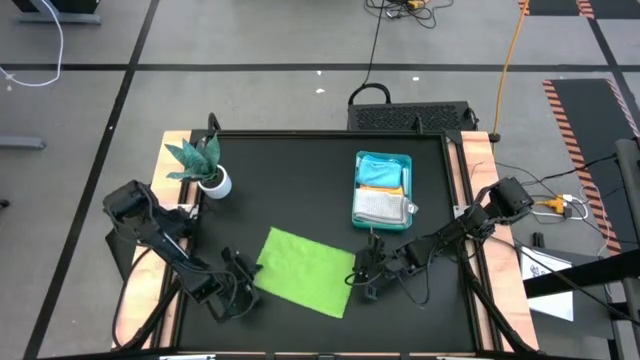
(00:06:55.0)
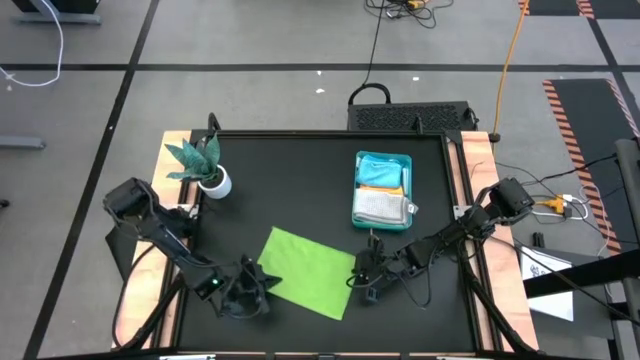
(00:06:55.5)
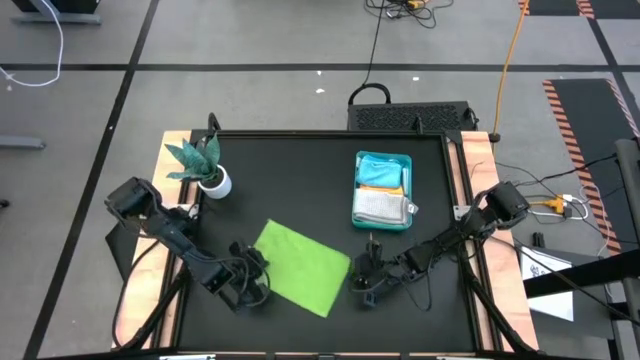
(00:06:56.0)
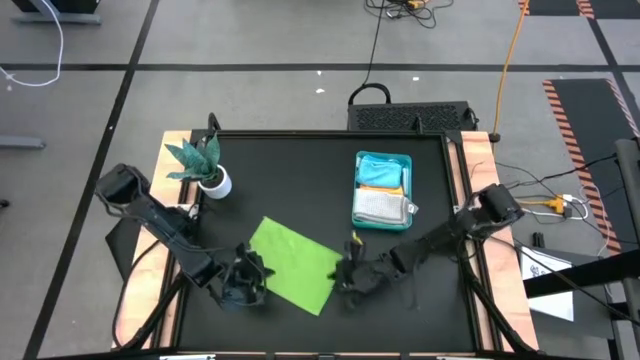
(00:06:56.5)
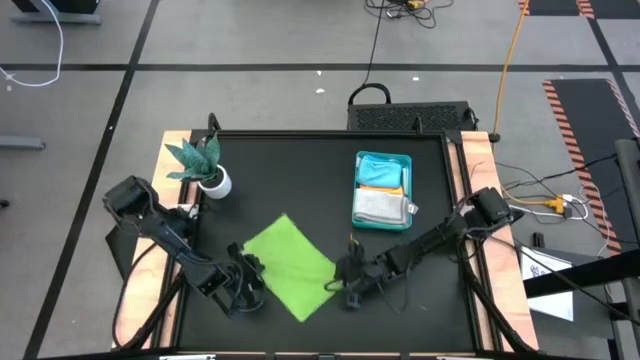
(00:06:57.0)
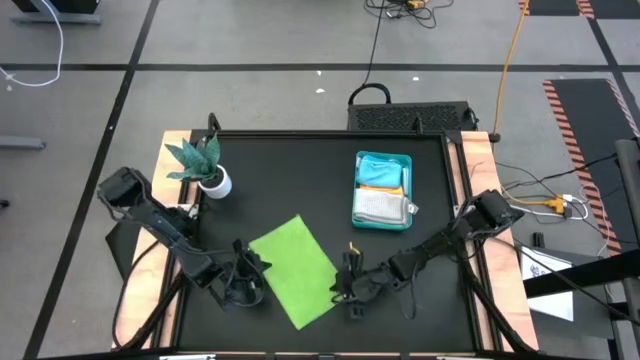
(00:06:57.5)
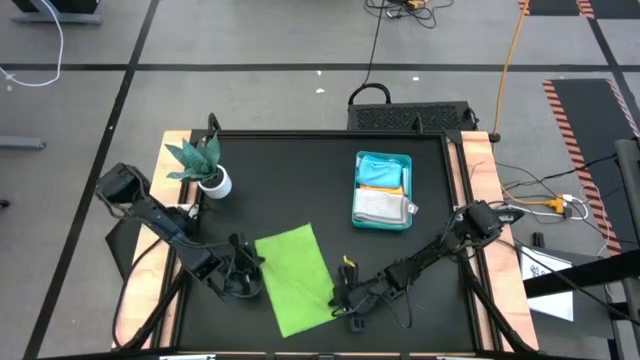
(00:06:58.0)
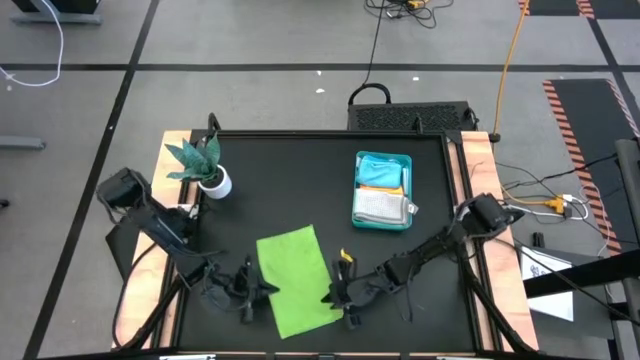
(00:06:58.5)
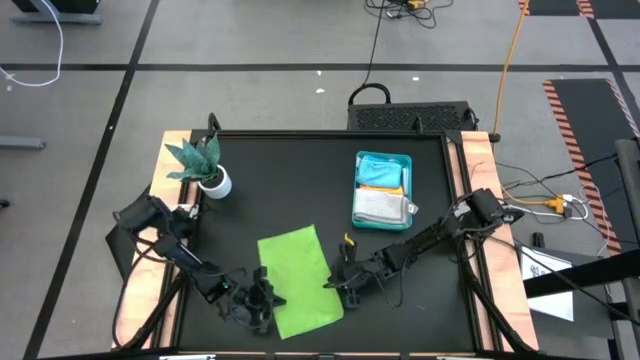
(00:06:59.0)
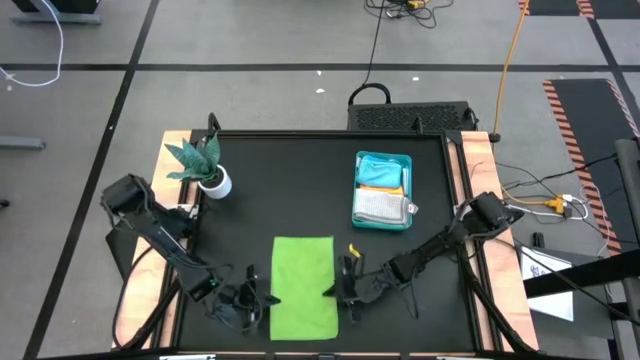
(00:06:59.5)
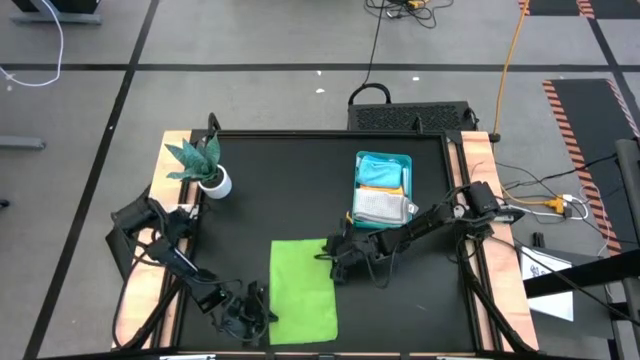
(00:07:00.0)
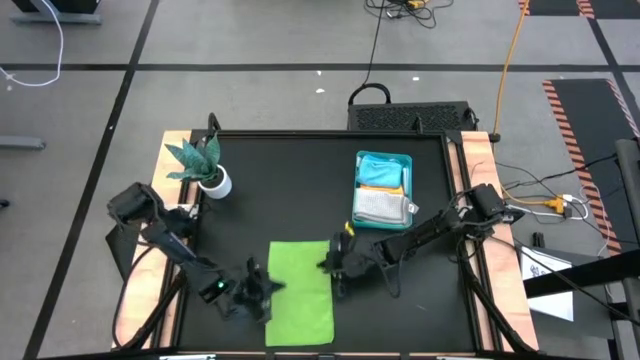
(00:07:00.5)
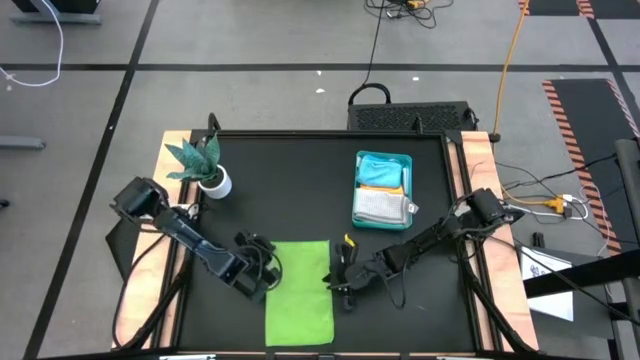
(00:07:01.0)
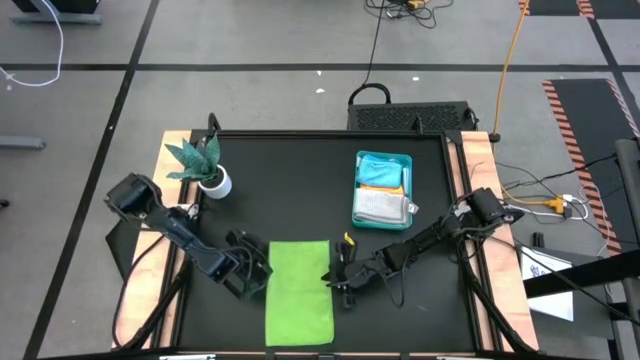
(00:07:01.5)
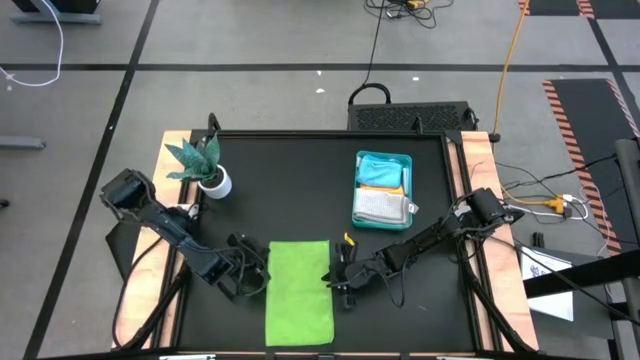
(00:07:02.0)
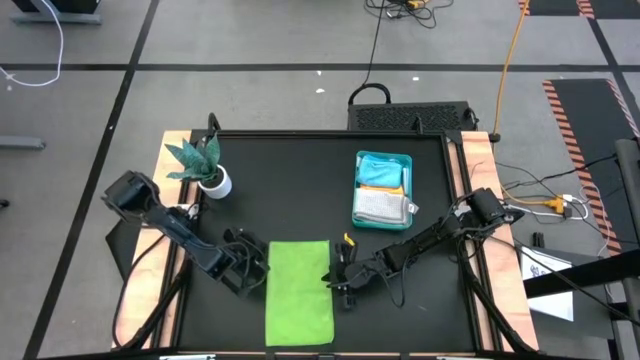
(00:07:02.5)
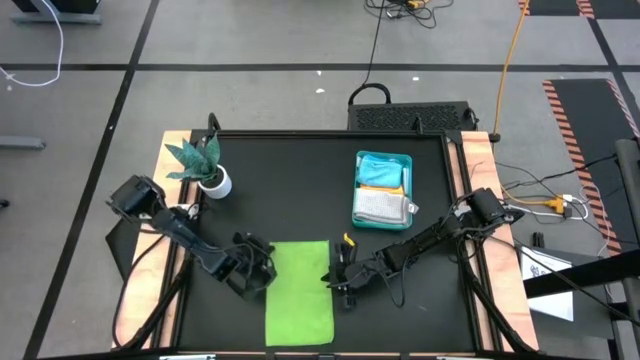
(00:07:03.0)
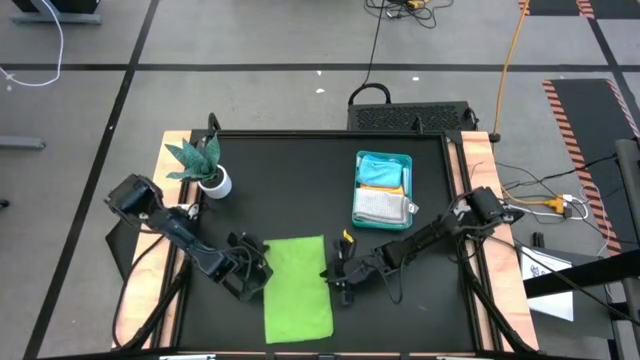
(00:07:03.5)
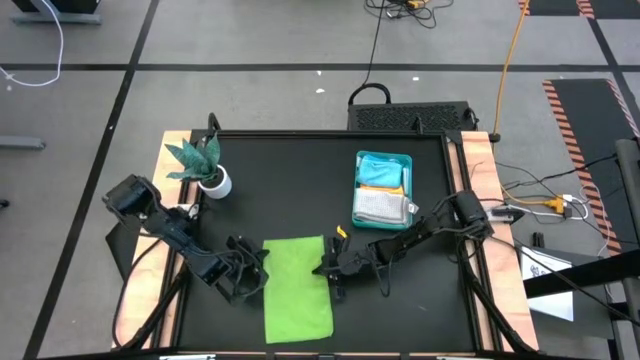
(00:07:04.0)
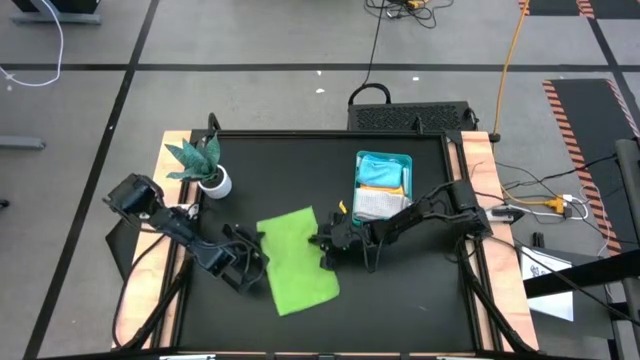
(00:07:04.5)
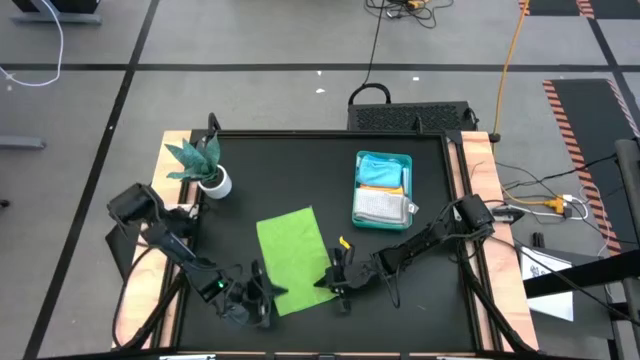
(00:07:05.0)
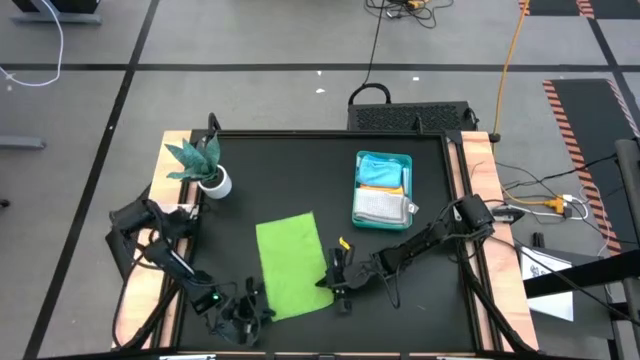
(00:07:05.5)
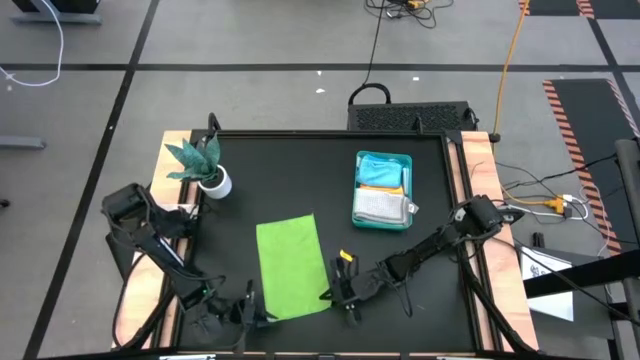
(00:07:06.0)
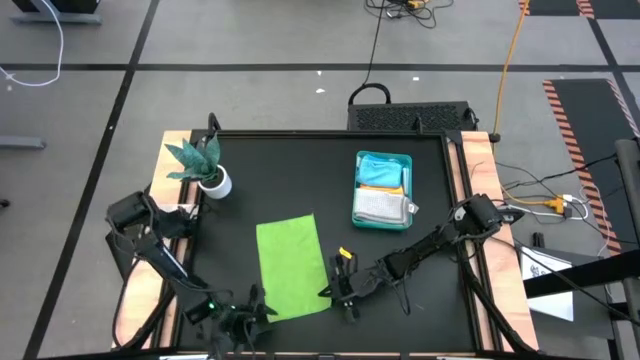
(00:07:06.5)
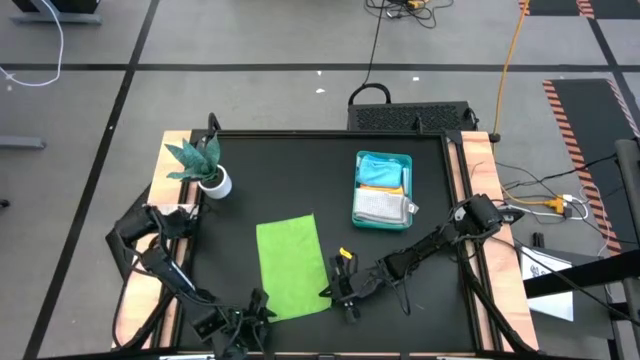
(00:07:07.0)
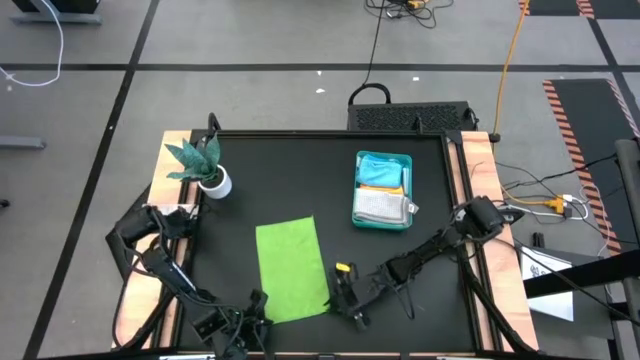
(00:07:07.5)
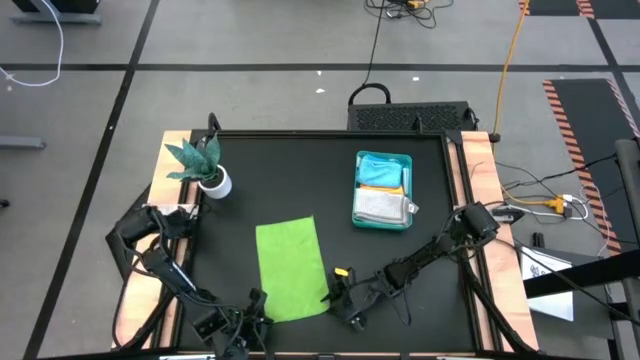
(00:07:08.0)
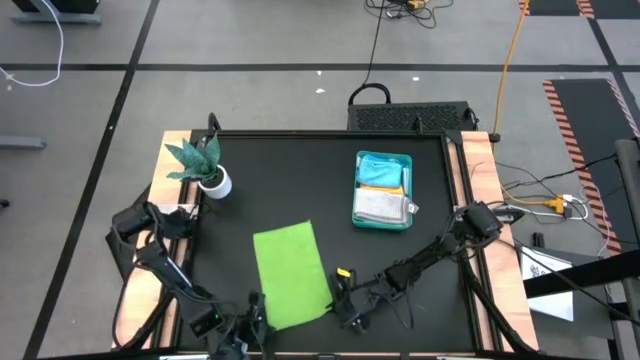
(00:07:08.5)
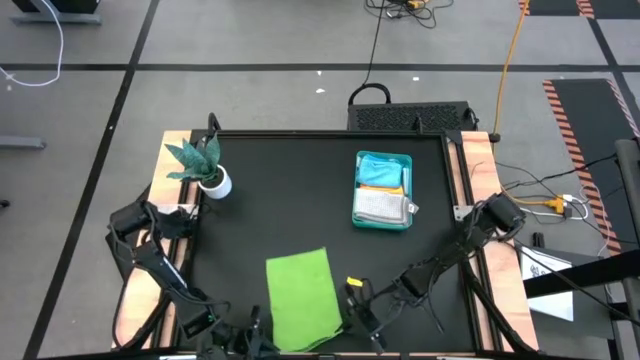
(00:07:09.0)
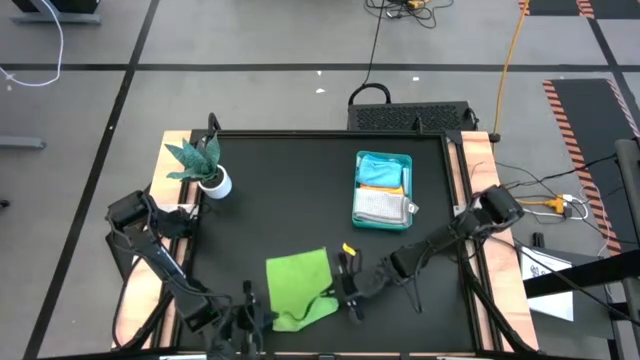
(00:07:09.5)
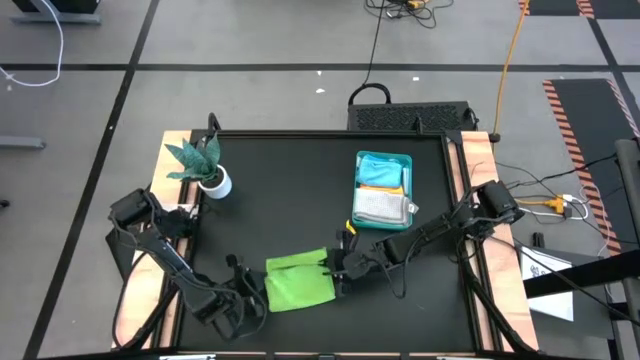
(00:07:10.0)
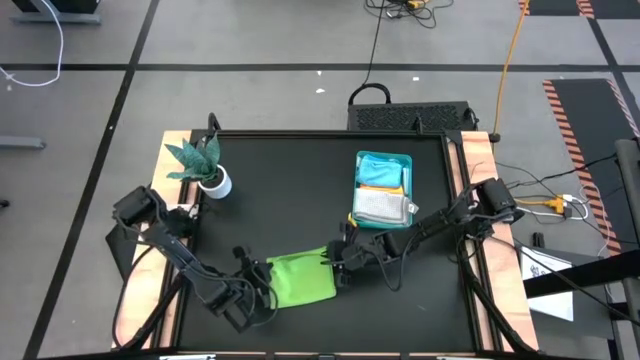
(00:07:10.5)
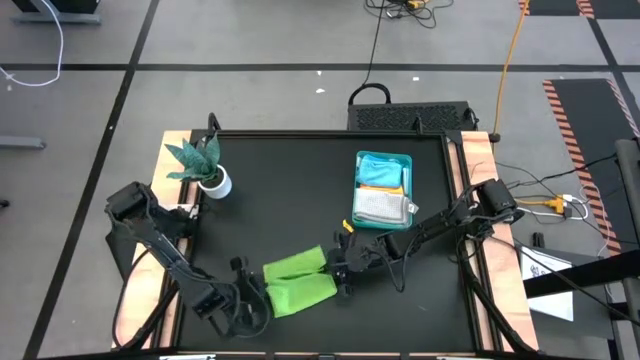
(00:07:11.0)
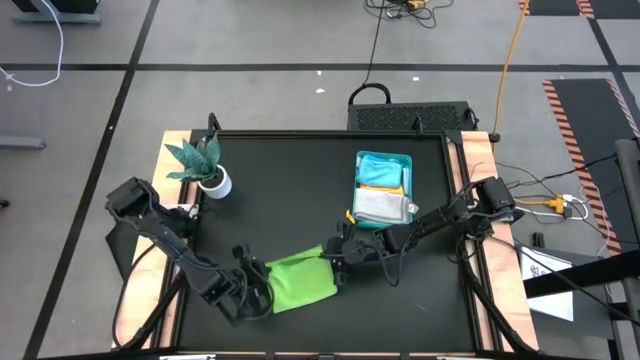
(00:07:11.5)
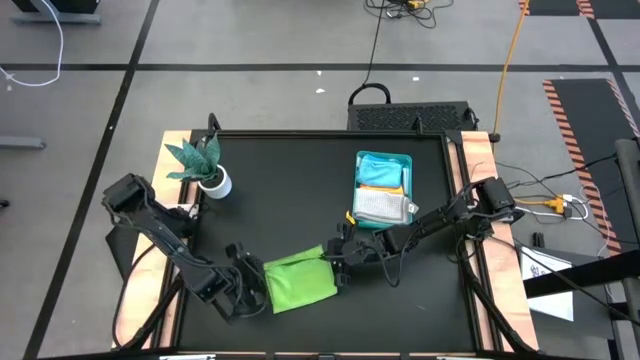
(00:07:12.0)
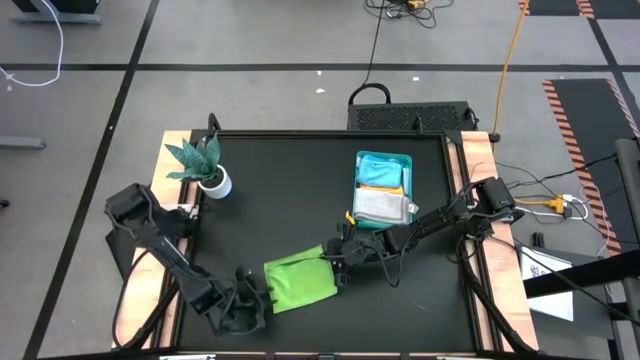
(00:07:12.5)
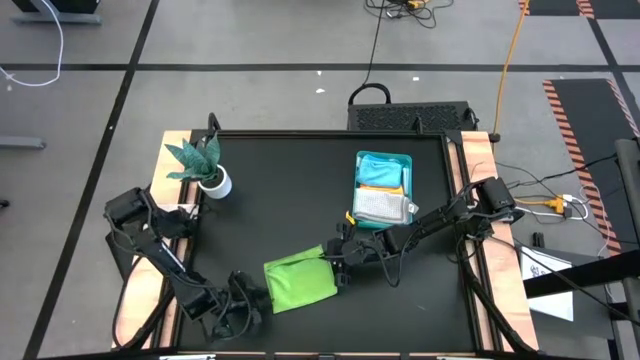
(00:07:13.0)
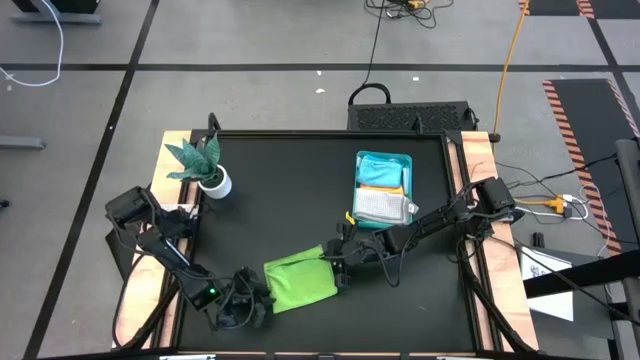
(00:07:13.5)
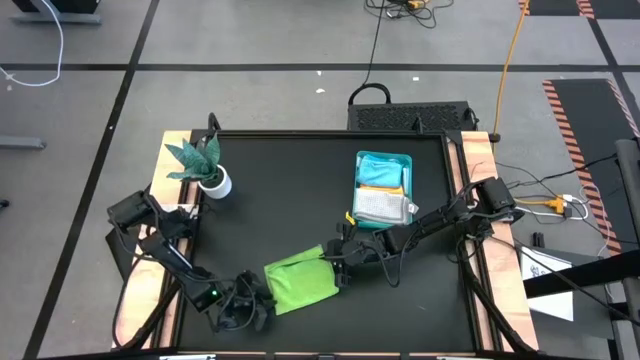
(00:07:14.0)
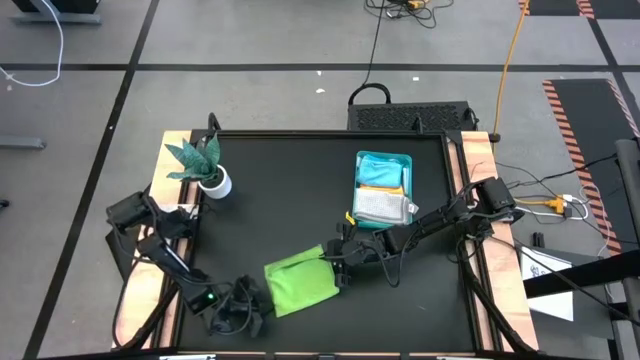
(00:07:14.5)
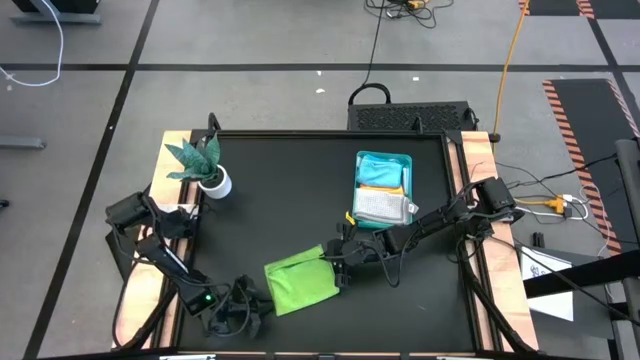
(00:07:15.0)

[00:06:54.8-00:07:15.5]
Task: Fold microfiber towels
Fold the light green microfiber cloth
